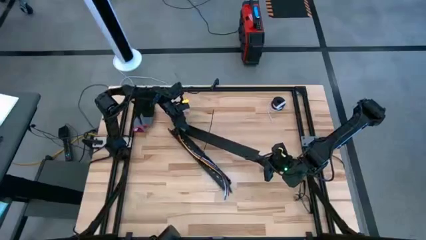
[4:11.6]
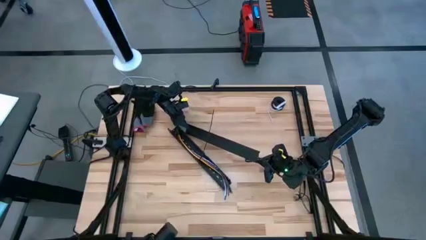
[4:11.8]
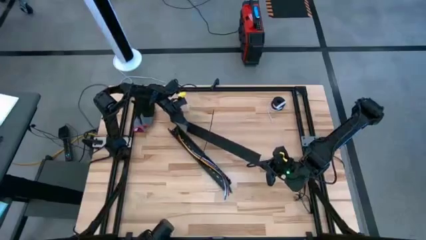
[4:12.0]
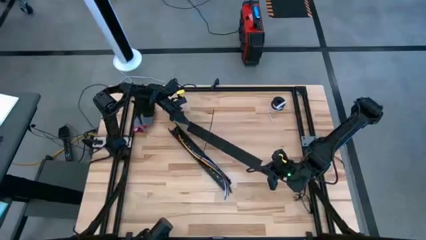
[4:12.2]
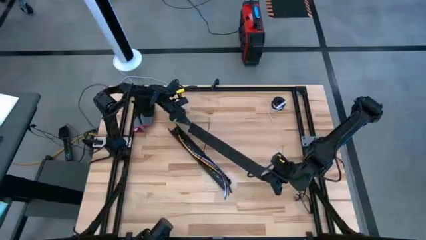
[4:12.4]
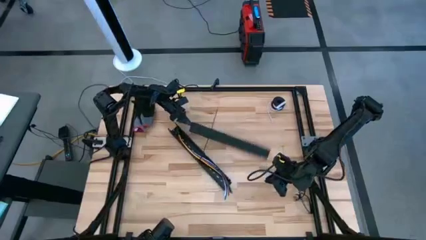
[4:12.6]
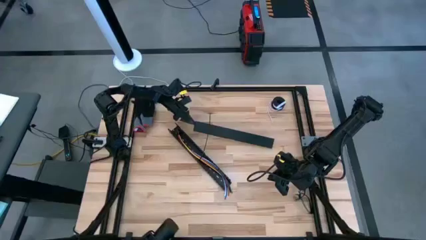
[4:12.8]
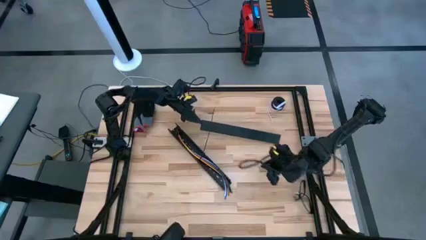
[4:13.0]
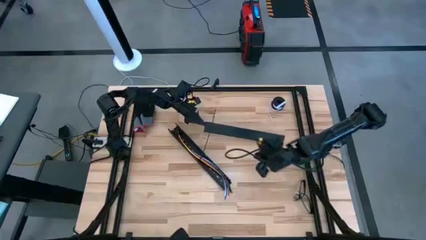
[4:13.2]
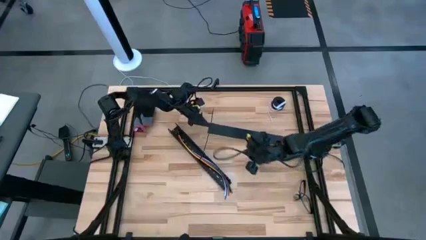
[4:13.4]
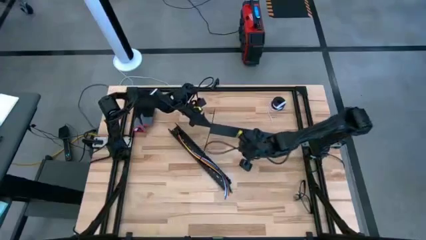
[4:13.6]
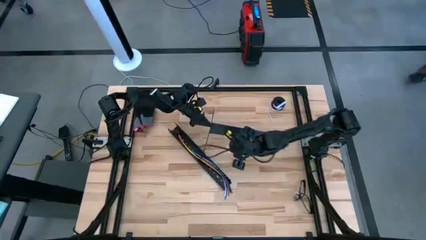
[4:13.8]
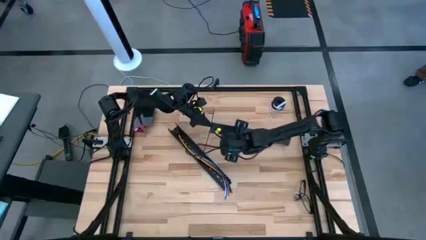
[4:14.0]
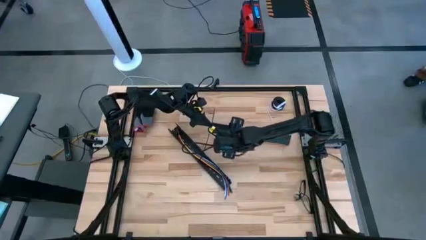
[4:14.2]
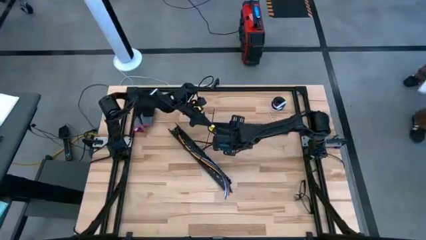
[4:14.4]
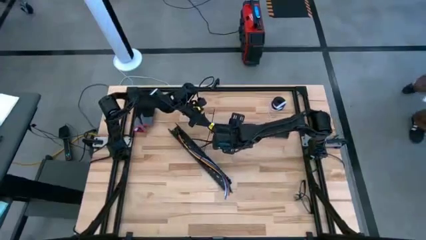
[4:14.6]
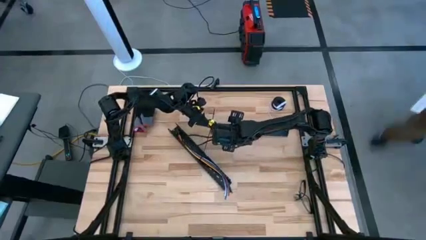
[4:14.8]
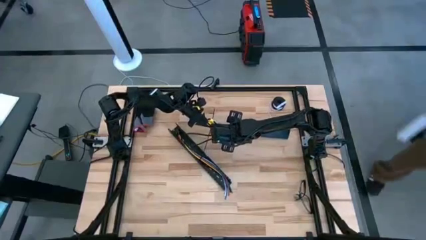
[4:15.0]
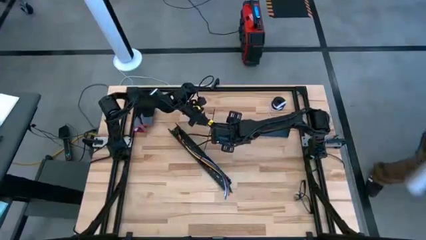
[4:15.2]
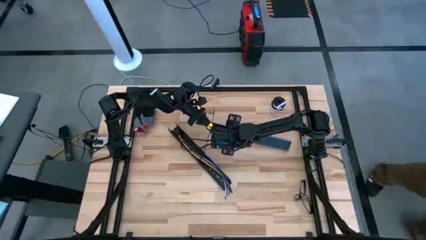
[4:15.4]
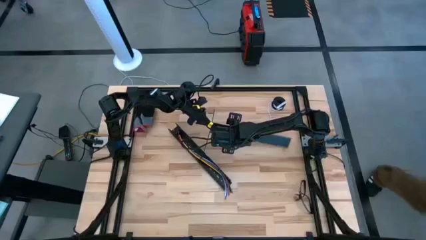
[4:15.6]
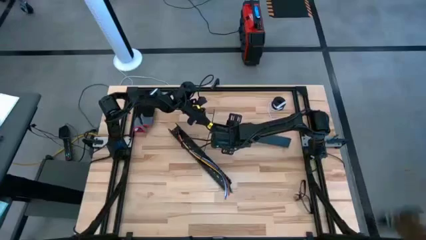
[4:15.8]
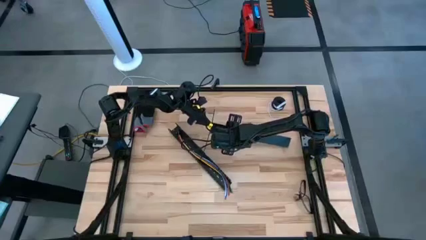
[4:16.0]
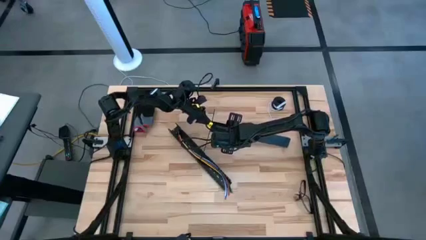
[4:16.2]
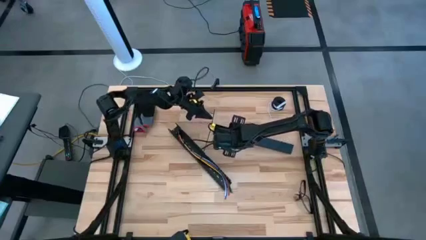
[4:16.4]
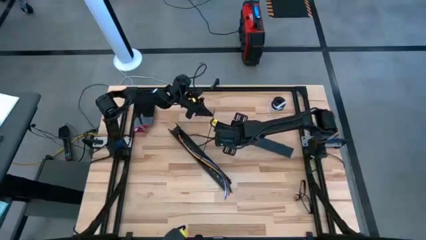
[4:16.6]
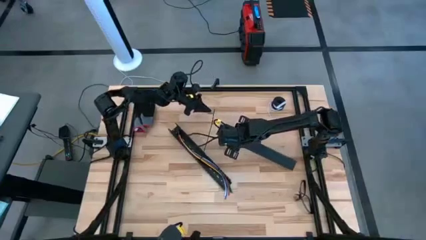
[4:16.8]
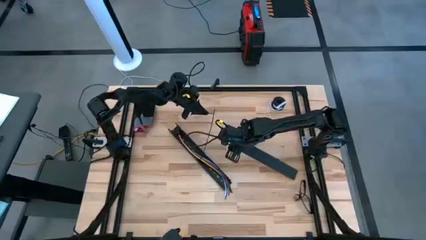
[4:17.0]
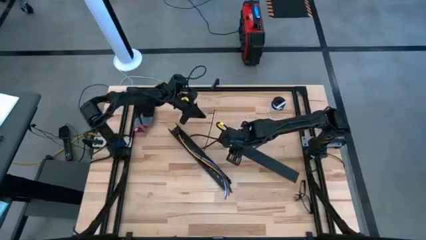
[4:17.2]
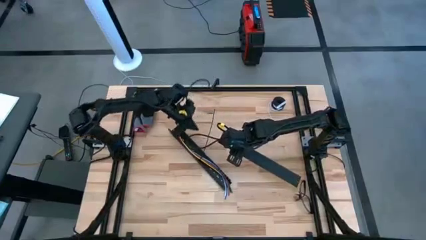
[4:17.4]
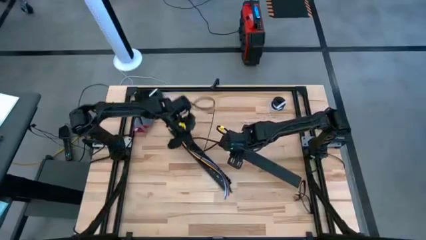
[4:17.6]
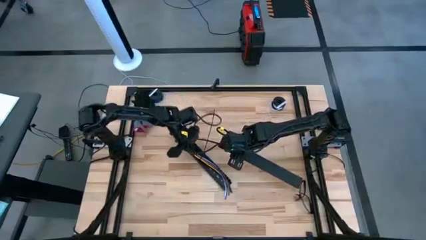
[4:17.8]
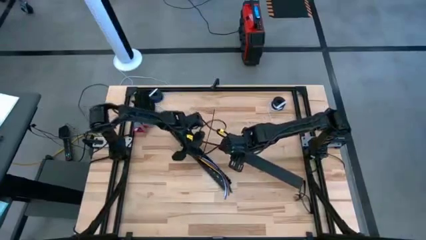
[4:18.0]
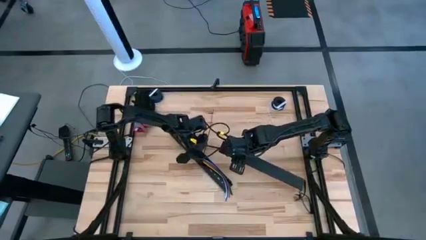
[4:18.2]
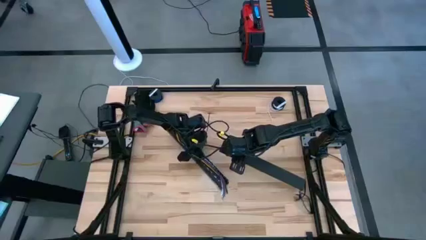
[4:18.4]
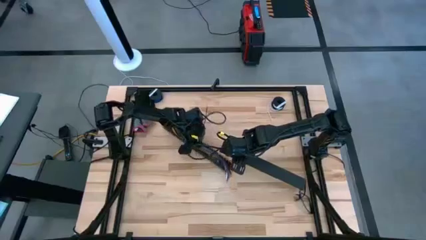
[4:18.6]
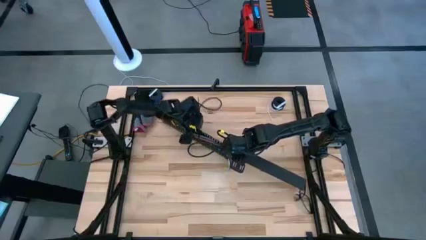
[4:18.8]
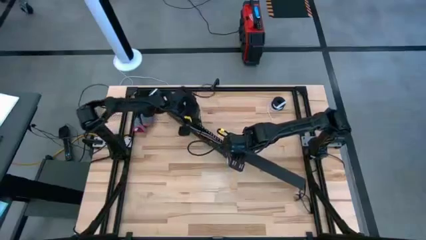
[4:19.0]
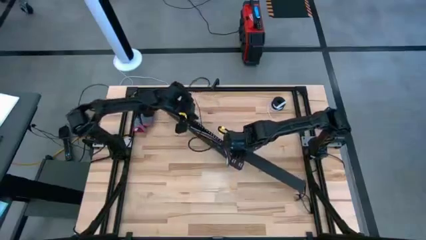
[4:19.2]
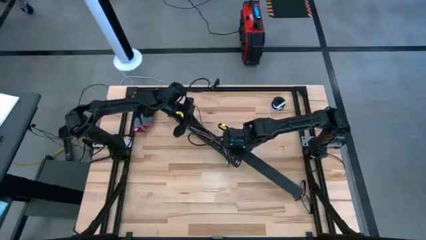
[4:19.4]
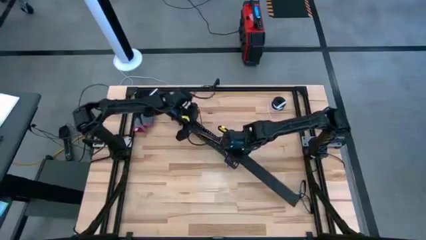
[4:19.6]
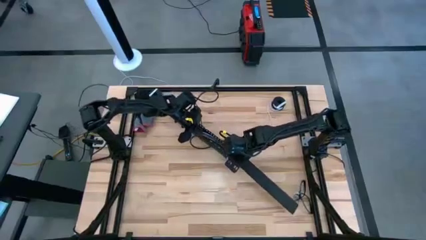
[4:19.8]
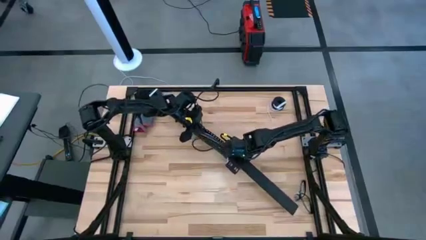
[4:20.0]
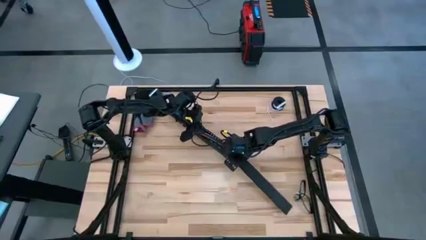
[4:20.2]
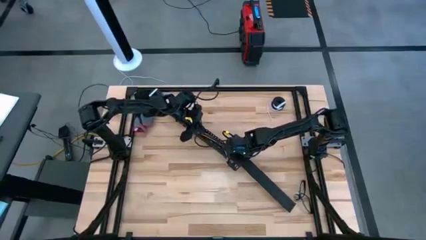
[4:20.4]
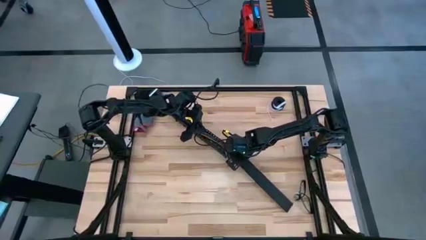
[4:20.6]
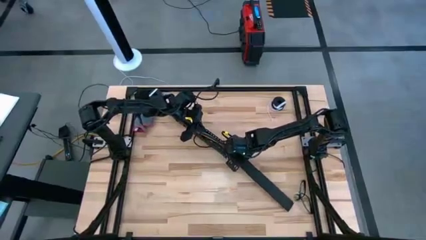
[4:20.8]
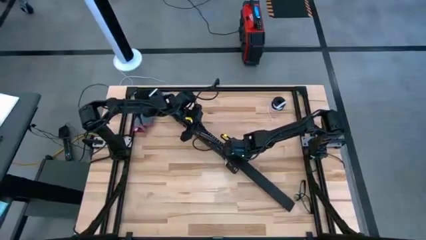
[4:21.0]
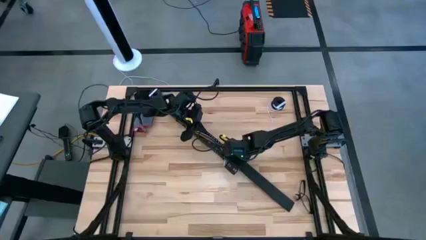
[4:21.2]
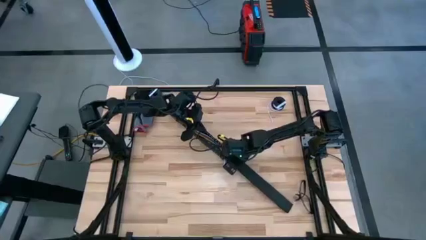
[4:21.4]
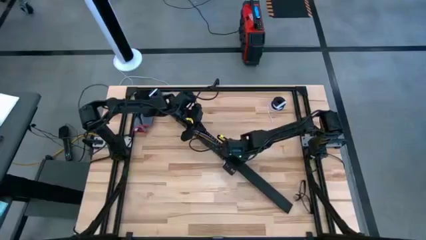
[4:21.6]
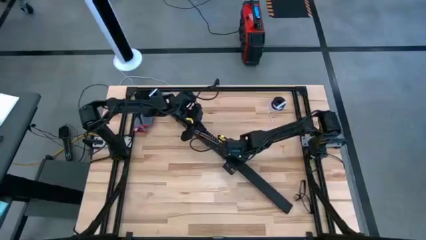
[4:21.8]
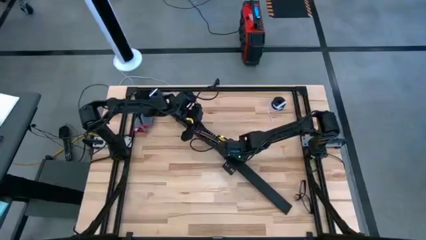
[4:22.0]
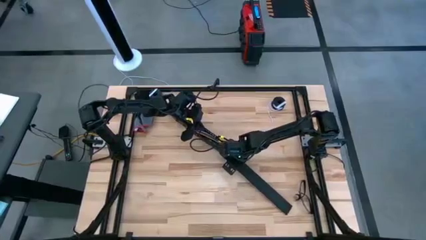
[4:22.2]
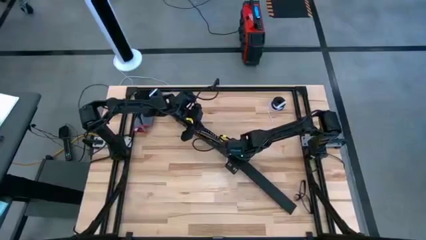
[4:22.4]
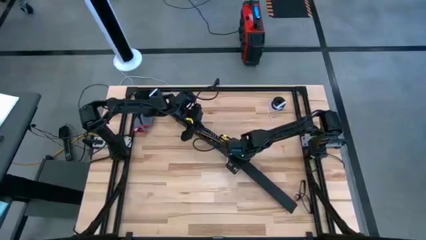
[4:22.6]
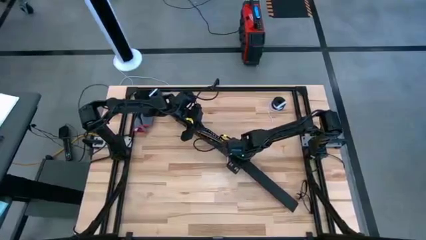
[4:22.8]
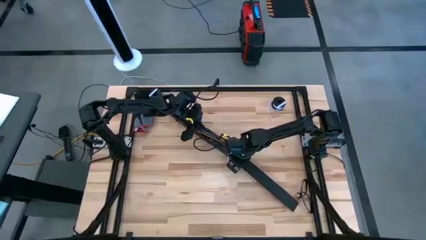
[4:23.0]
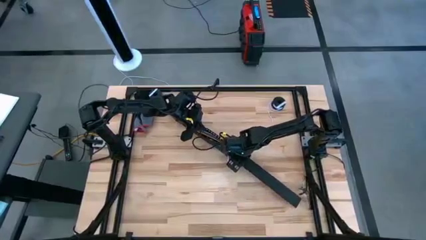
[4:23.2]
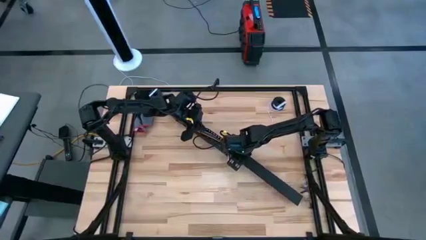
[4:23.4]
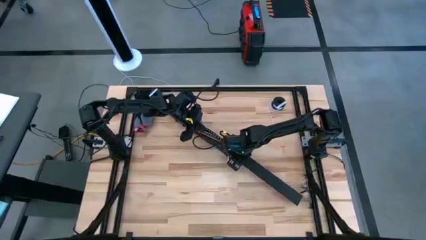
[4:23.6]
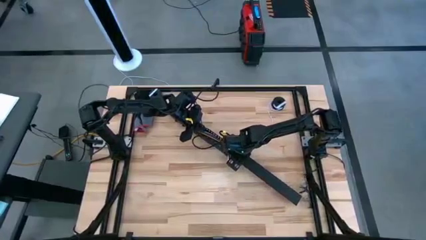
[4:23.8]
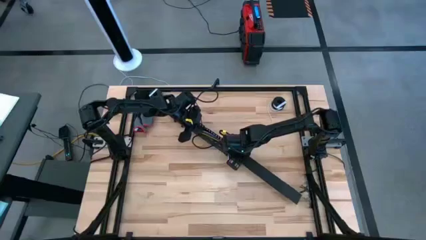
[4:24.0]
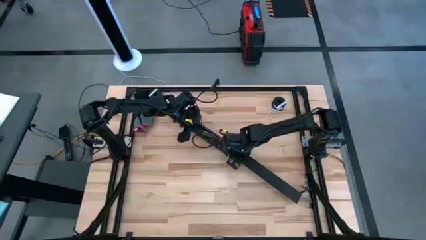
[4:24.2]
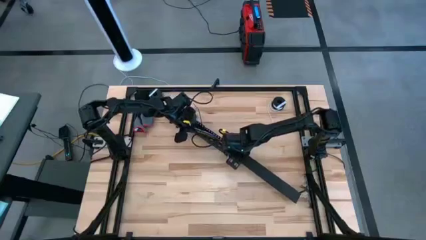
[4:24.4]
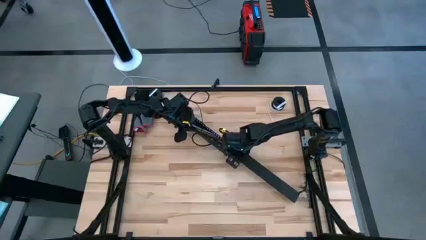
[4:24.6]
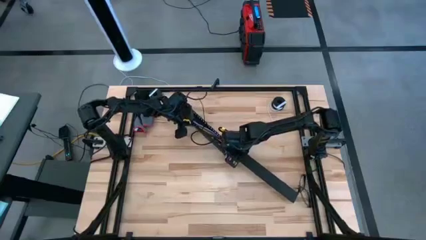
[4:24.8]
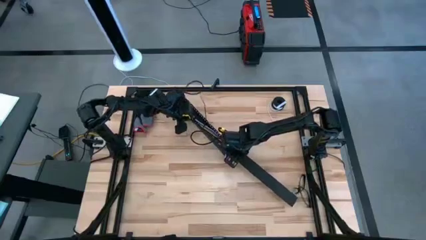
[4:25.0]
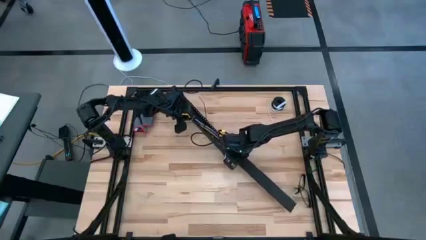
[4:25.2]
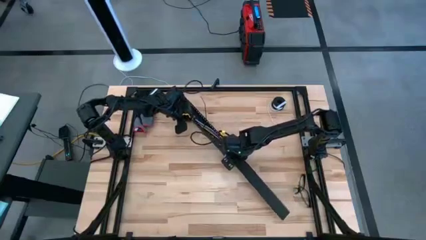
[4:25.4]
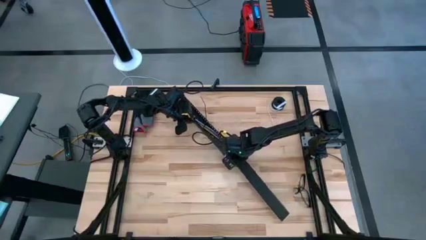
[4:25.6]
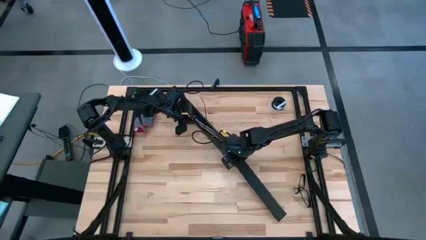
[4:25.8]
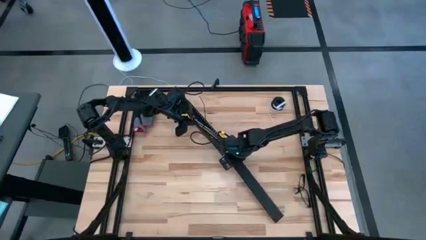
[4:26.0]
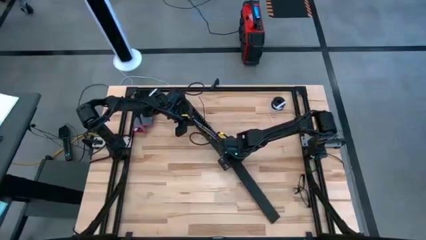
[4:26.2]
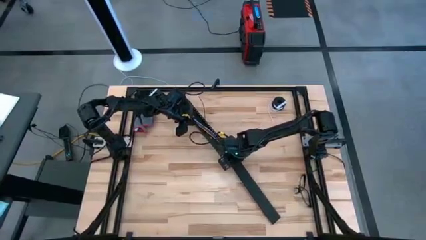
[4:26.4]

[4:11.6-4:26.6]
Task: Ziptie cables
Close the black cable duct

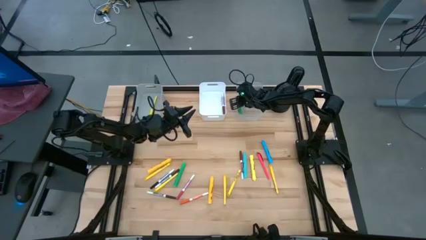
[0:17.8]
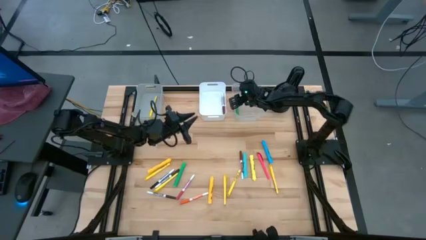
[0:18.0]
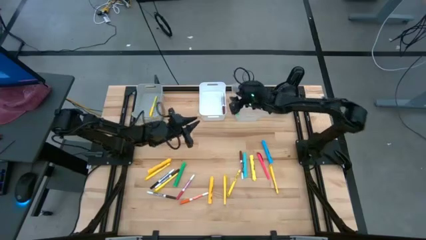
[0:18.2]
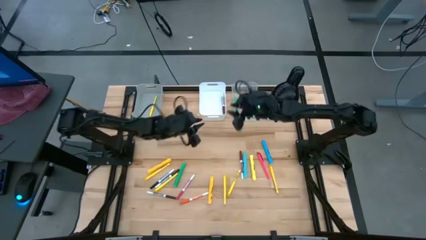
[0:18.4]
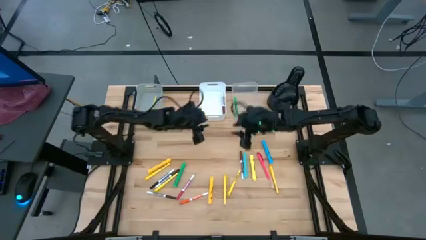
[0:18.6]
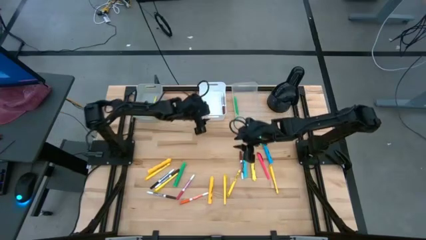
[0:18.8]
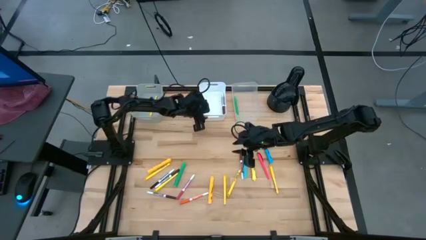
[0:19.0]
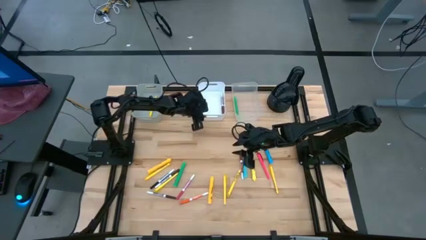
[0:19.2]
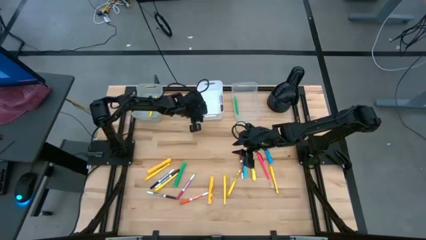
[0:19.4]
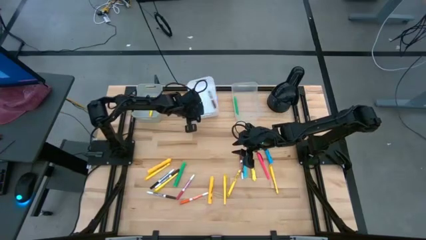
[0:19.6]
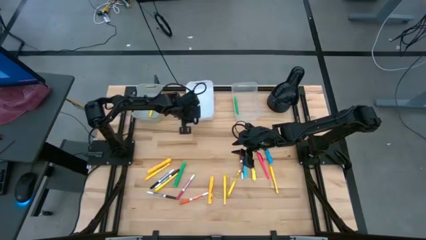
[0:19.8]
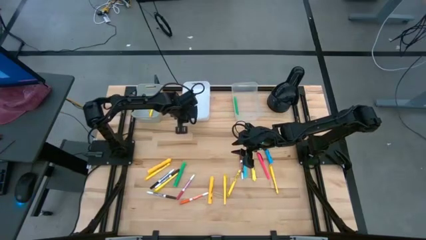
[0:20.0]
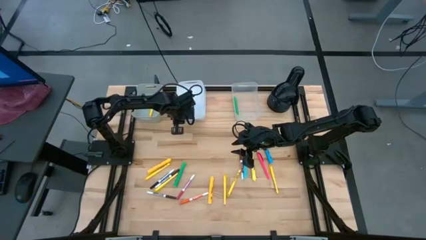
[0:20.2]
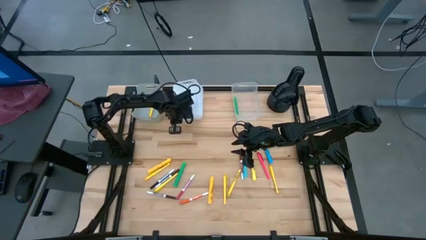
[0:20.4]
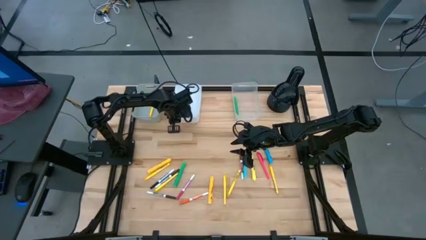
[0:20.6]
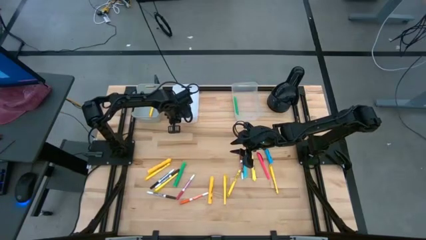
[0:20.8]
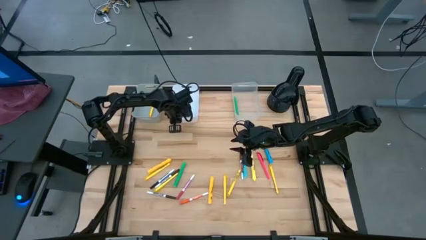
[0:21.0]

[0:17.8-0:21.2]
Task: Pick & Place Markers
Move the white and transparent bins to the left of the table
